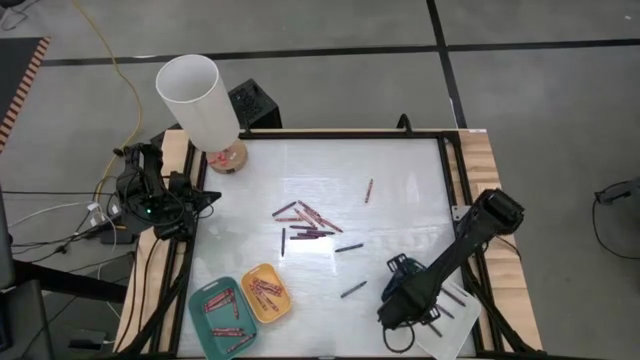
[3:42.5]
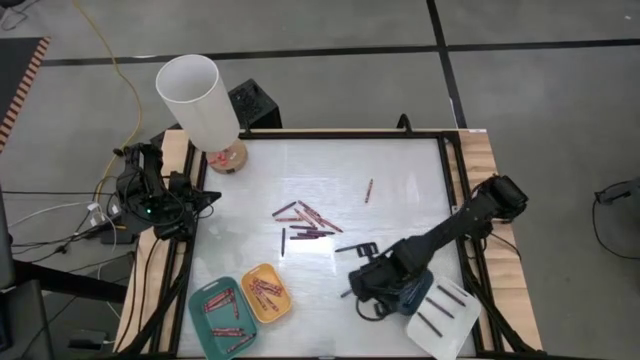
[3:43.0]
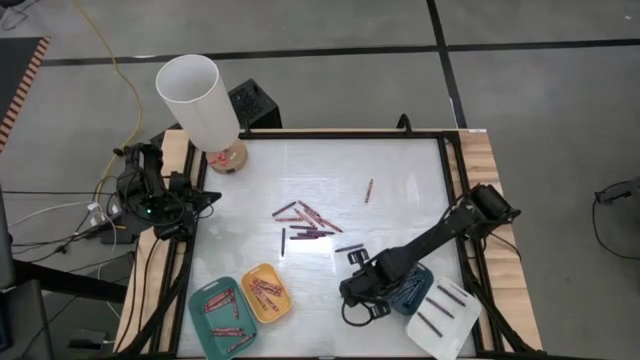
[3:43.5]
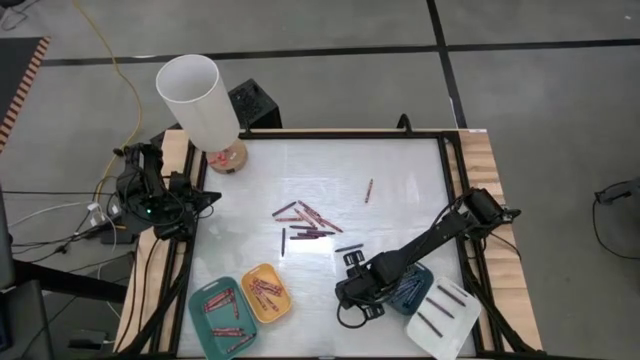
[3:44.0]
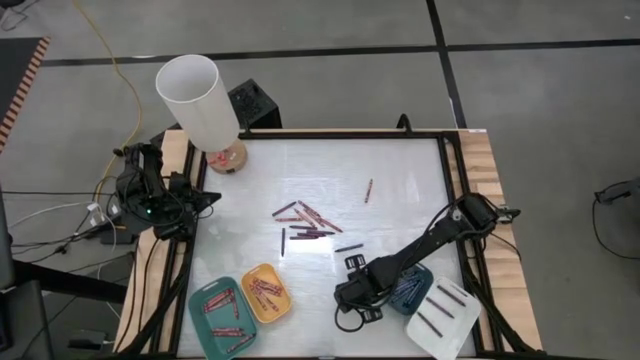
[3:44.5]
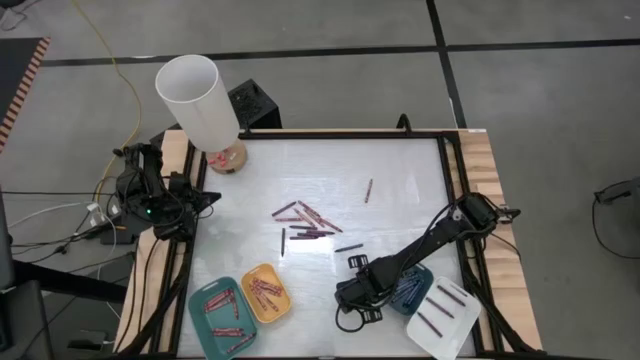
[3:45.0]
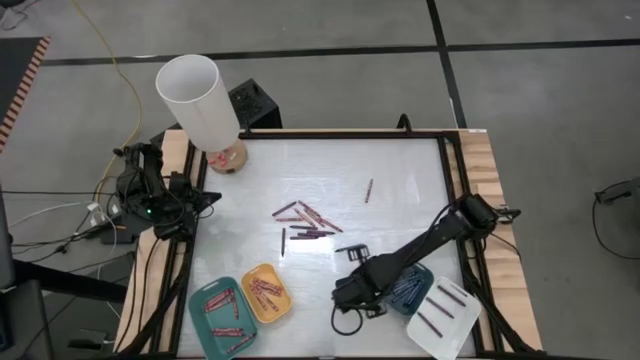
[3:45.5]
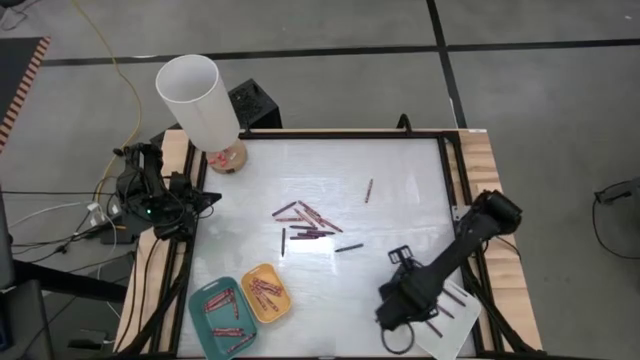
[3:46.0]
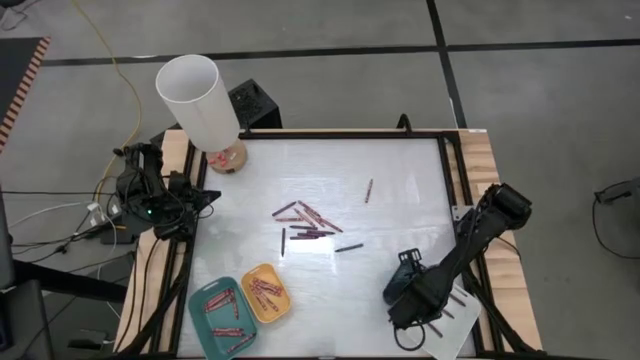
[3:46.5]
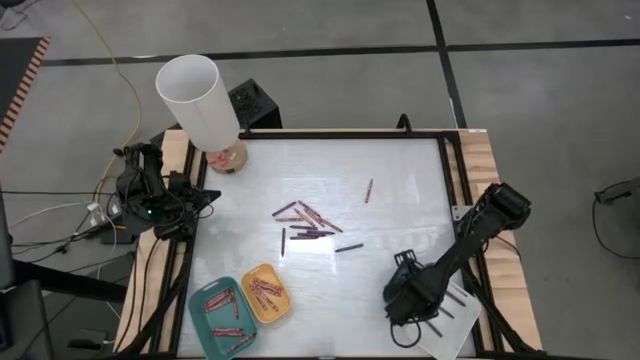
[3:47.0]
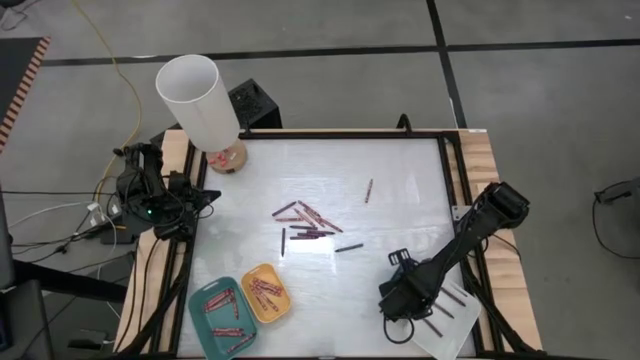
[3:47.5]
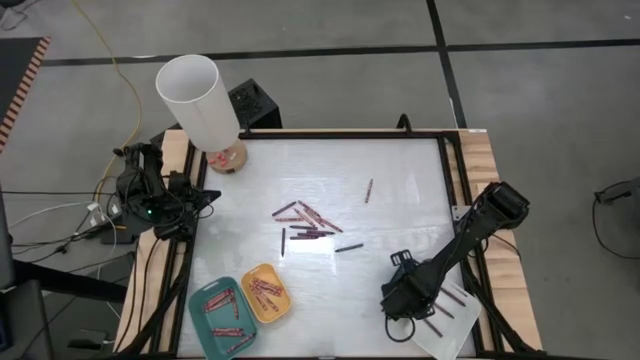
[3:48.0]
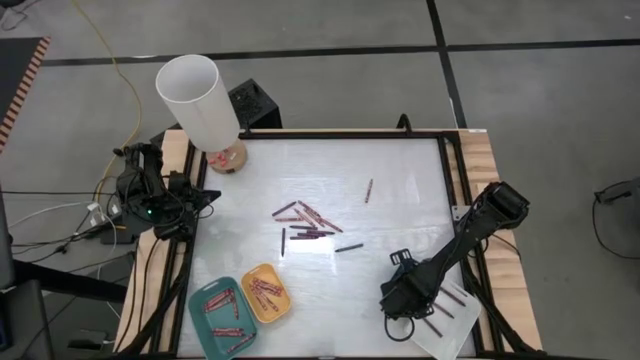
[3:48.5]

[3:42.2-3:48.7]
Task: Sort crayons
Put the blue crayon into the dark blue bin

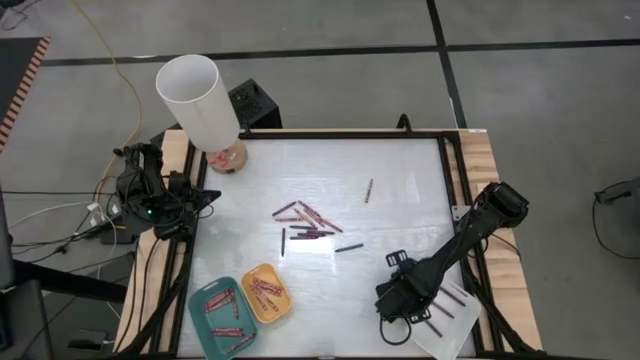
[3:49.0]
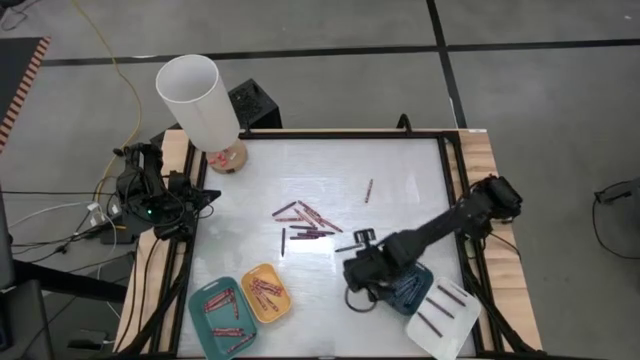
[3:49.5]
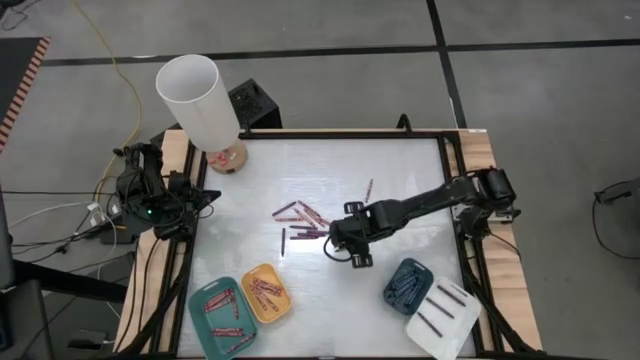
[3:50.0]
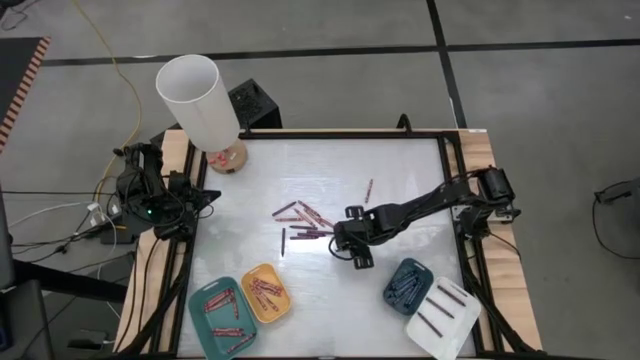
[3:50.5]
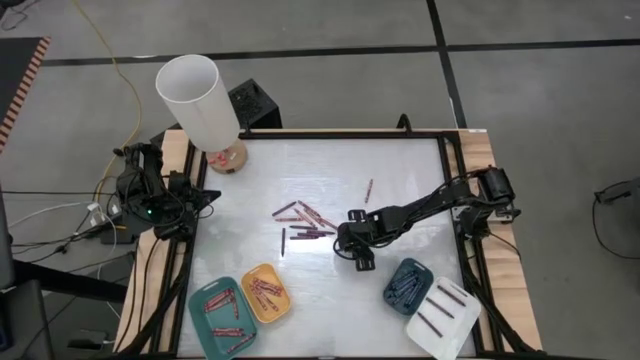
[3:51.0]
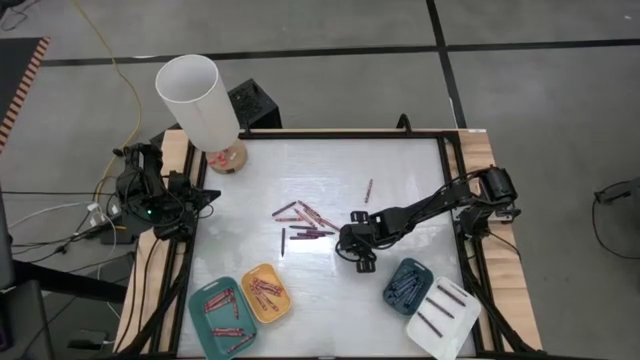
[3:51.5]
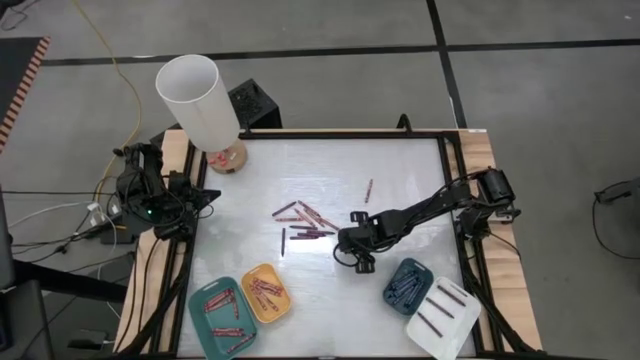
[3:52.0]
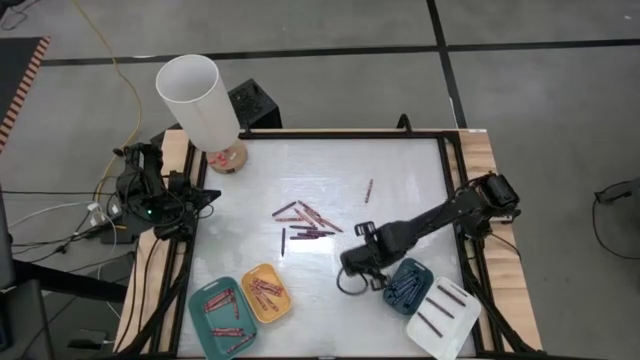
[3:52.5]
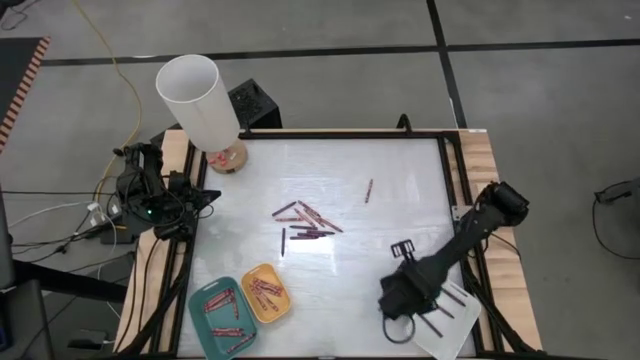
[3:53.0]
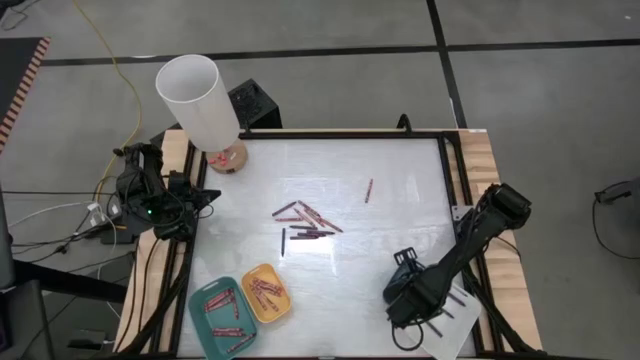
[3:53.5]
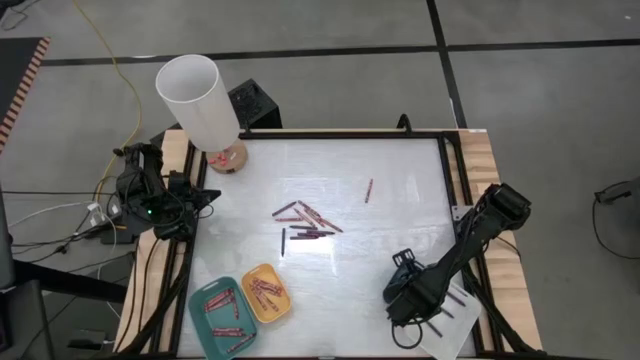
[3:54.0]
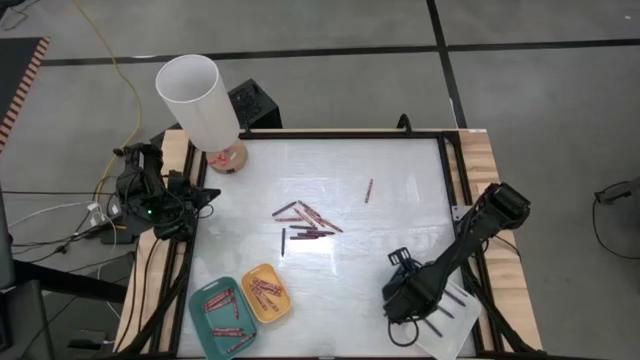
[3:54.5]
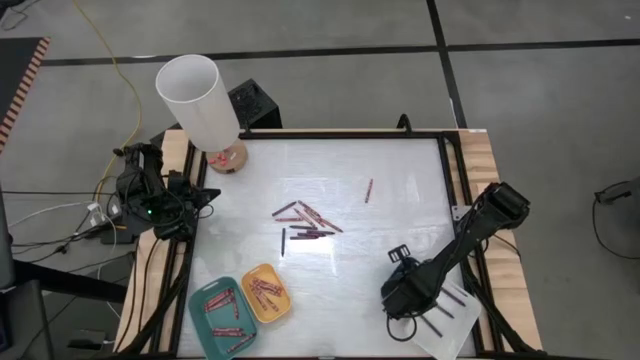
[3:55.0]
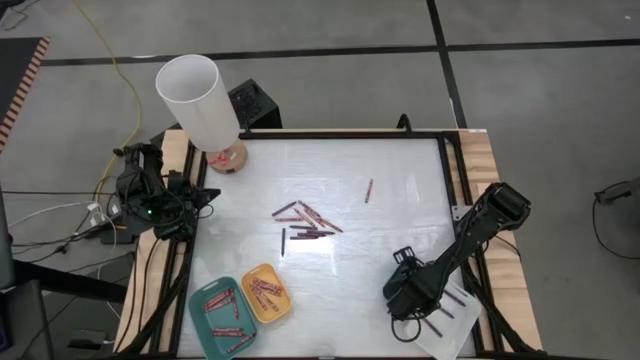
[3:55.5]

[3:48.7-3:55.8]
Put the blue crayon into the dark blue bin

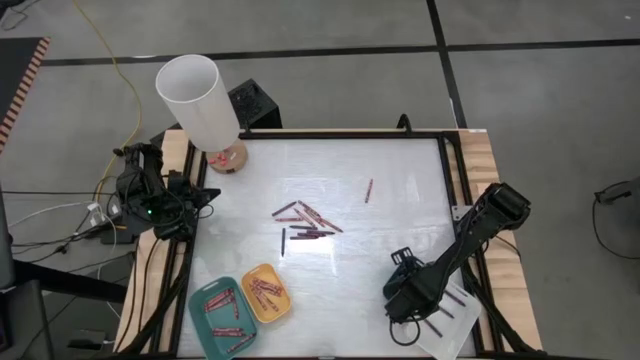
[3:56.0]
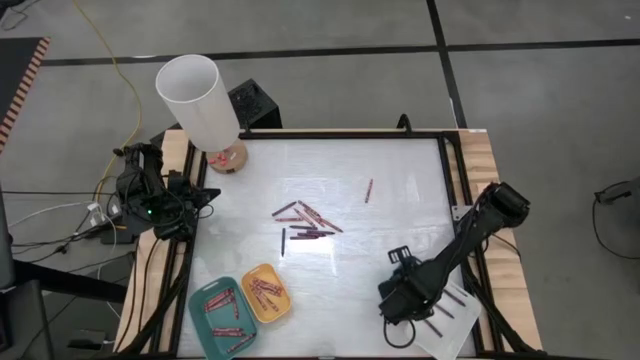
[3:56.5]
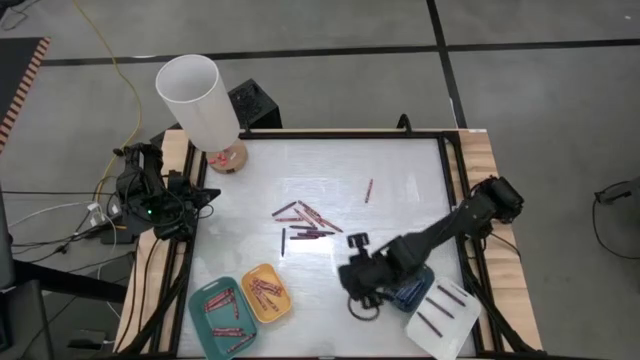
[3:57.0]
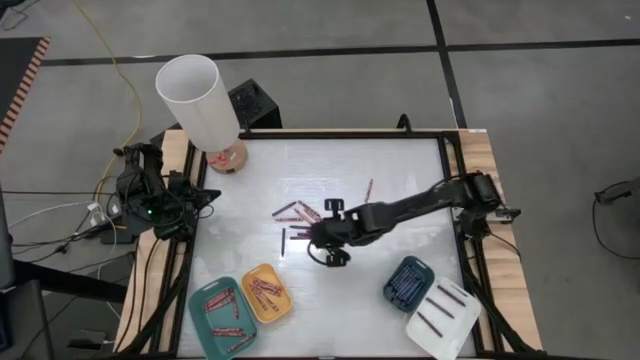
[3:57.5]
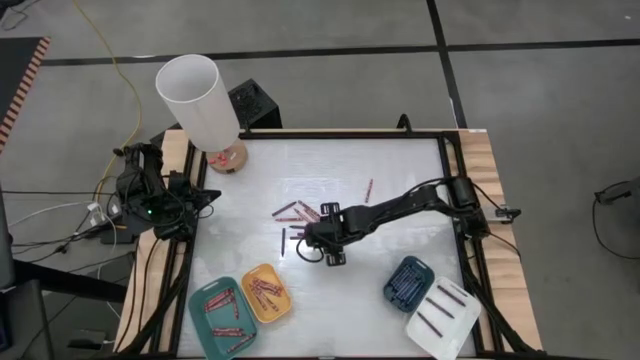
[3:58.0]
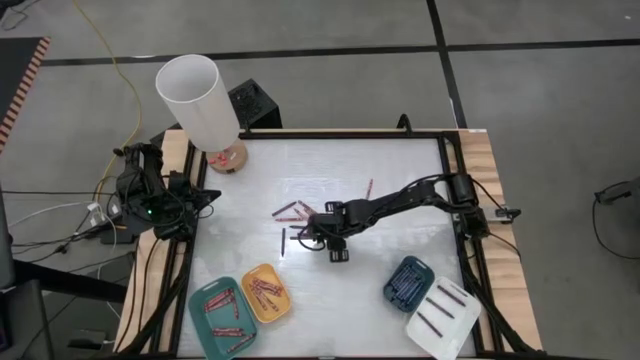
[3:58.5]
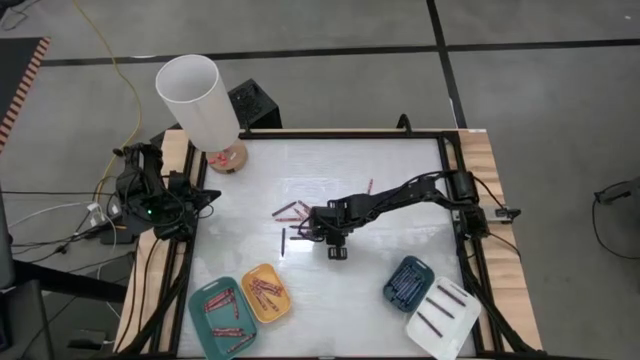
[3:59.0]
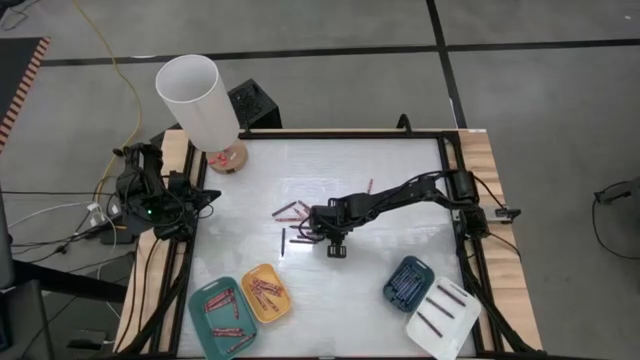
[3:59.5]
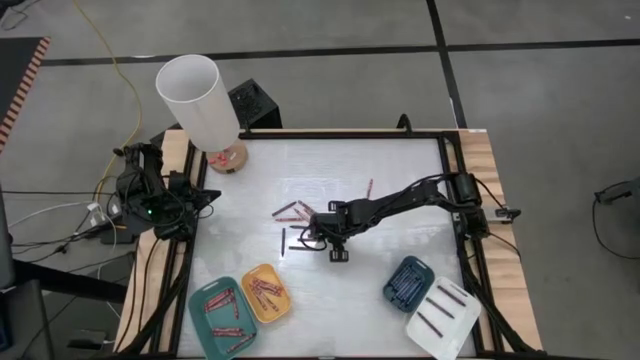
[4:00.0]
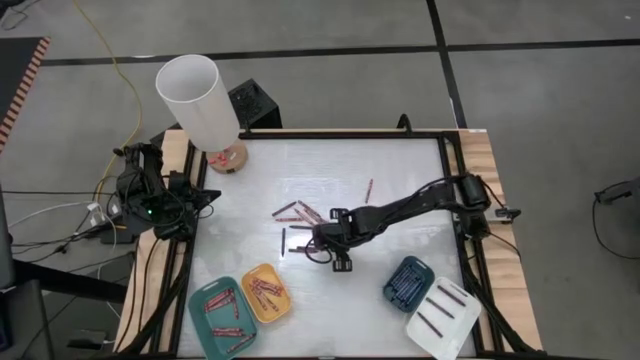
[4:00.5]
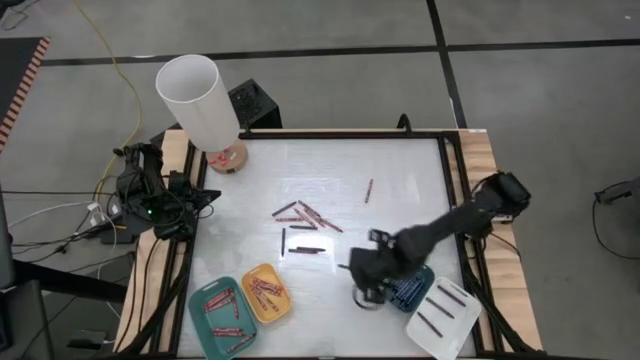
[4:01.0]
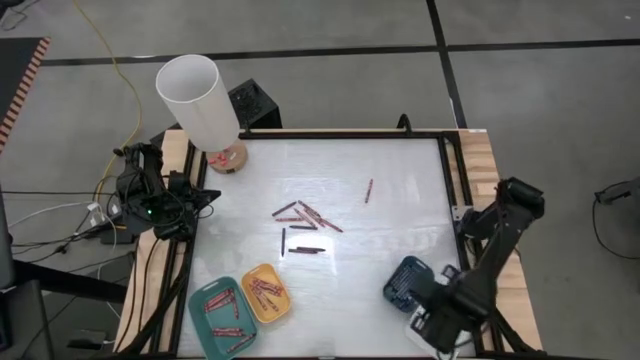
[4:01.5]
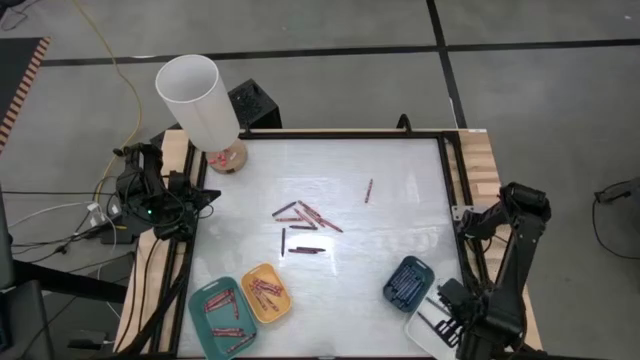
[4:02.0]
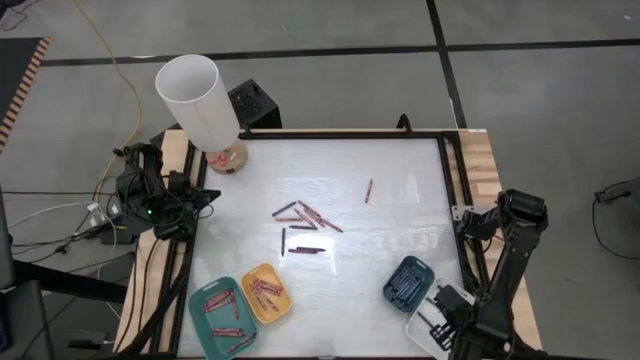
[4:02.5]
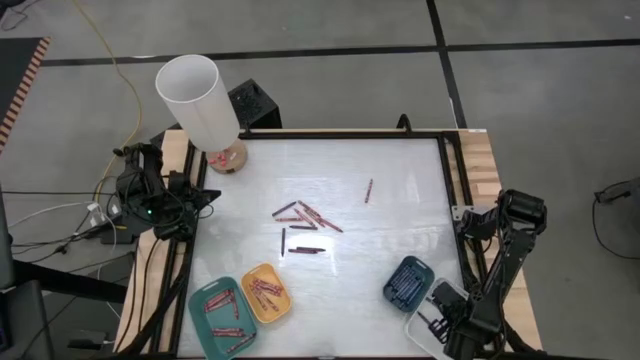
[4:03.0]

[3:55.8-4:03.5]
Put the purple crayon into the white bin
